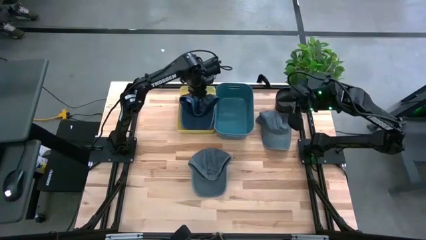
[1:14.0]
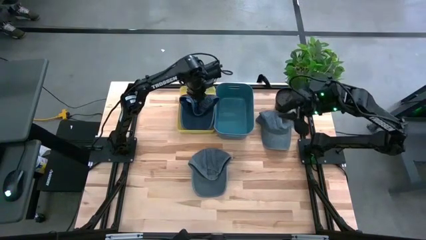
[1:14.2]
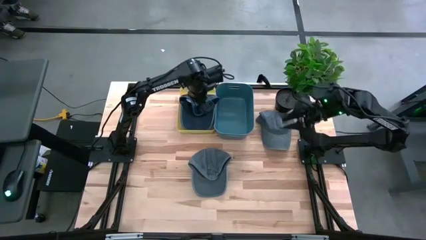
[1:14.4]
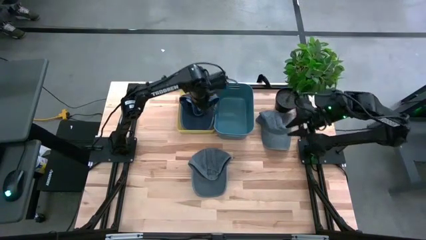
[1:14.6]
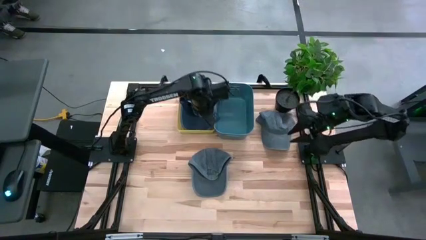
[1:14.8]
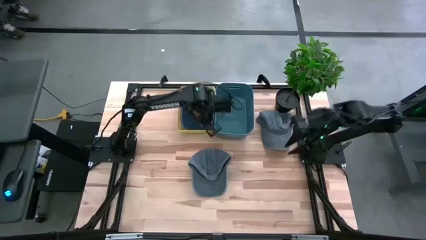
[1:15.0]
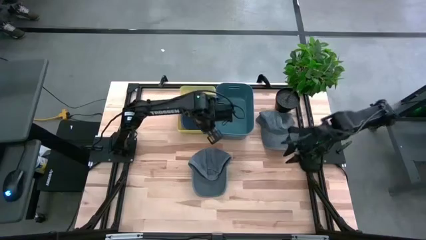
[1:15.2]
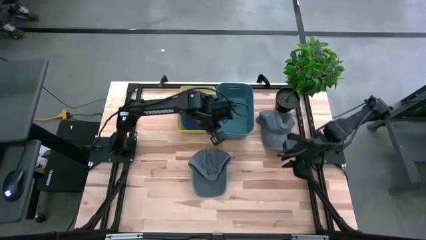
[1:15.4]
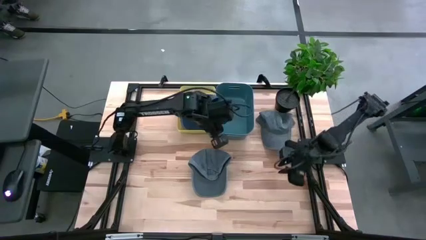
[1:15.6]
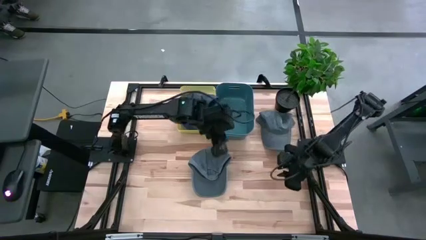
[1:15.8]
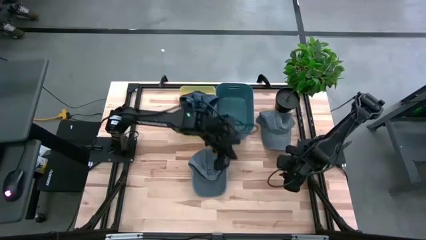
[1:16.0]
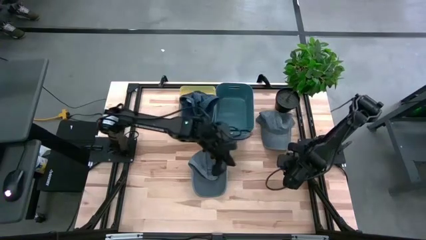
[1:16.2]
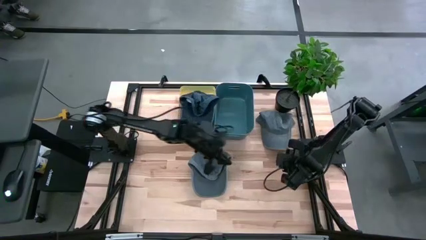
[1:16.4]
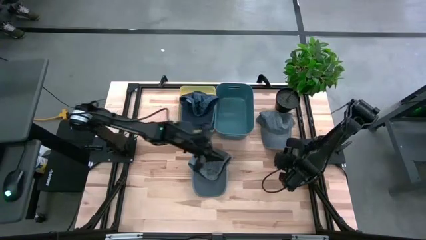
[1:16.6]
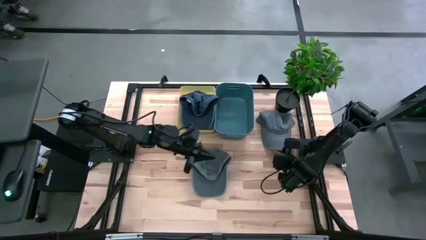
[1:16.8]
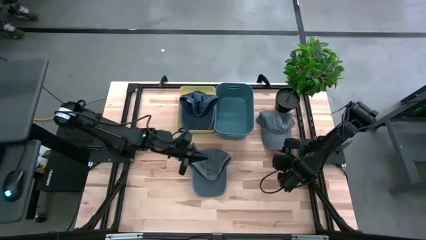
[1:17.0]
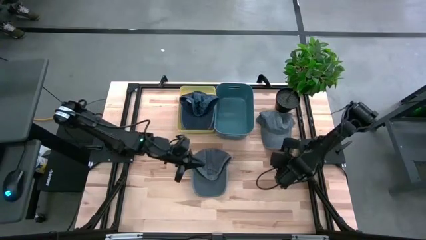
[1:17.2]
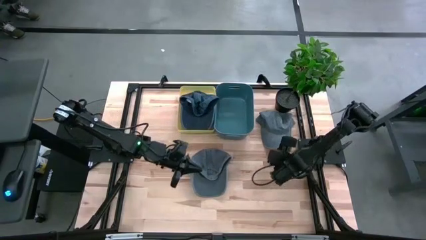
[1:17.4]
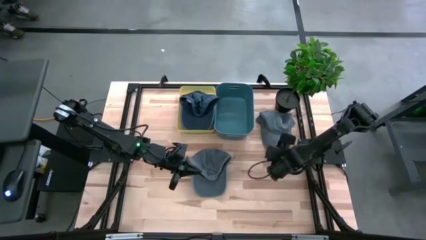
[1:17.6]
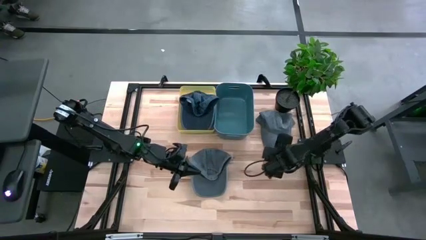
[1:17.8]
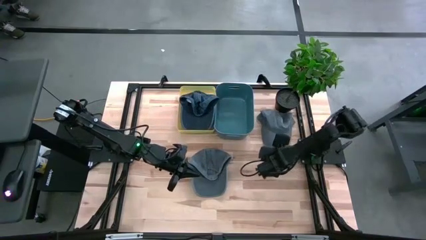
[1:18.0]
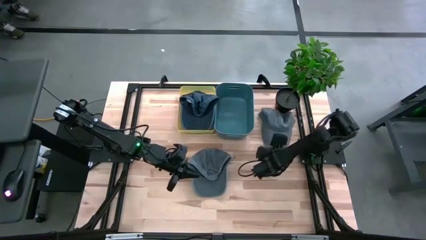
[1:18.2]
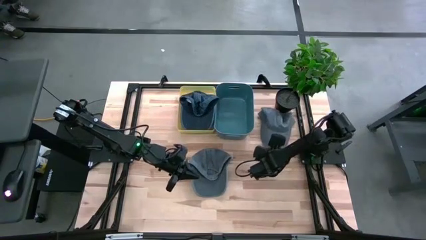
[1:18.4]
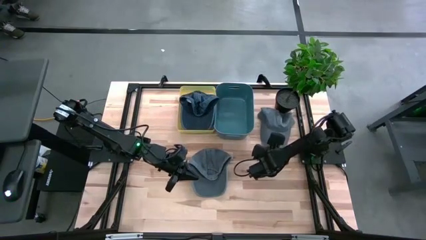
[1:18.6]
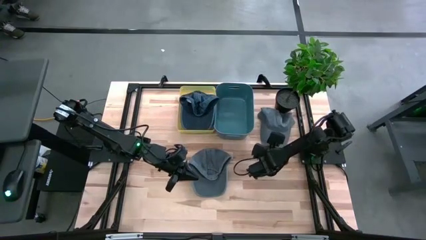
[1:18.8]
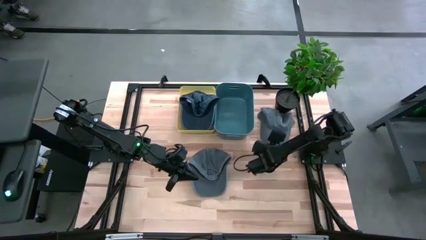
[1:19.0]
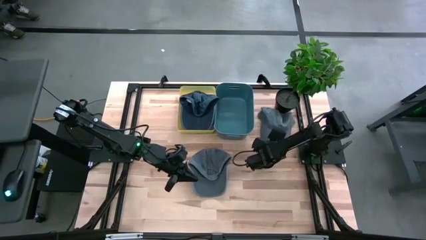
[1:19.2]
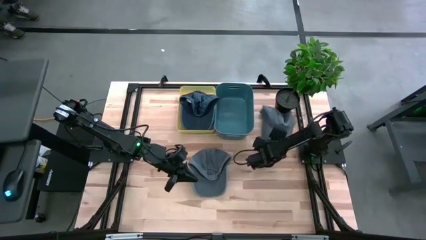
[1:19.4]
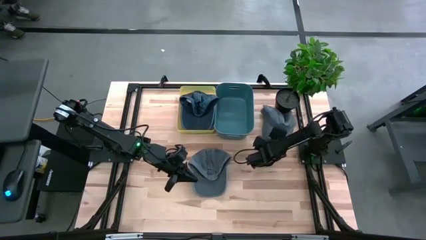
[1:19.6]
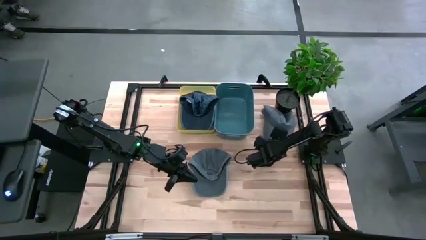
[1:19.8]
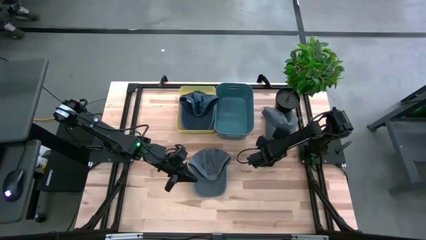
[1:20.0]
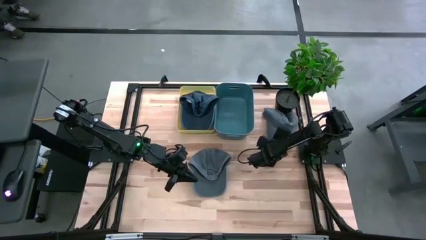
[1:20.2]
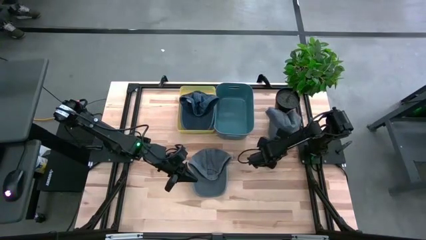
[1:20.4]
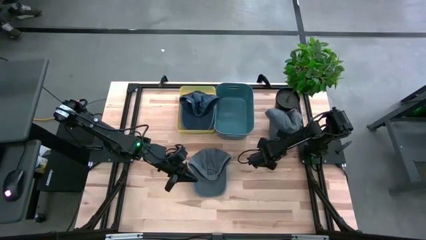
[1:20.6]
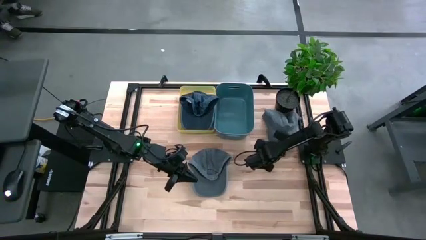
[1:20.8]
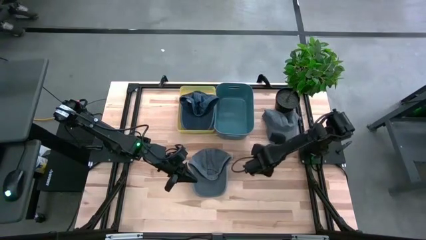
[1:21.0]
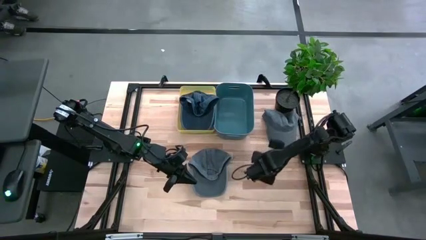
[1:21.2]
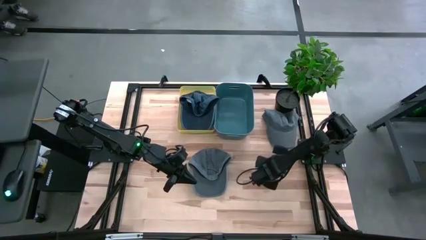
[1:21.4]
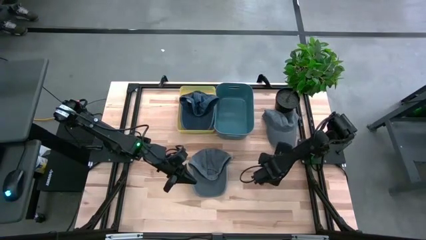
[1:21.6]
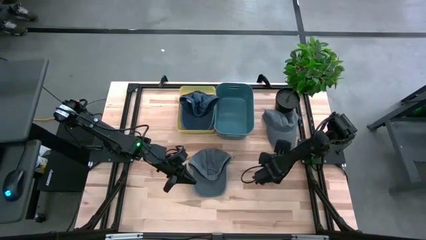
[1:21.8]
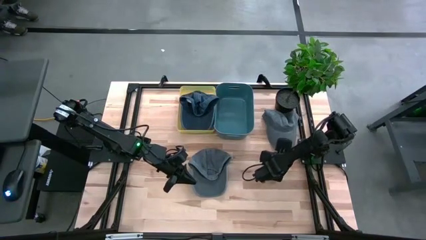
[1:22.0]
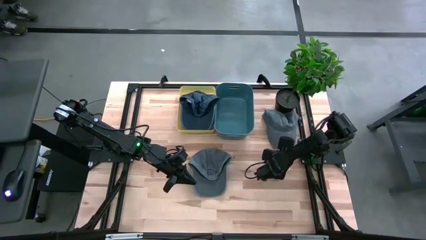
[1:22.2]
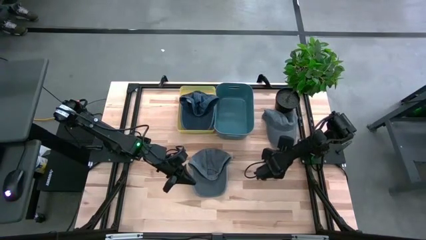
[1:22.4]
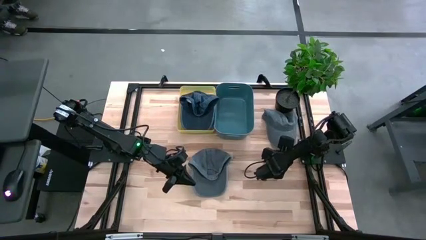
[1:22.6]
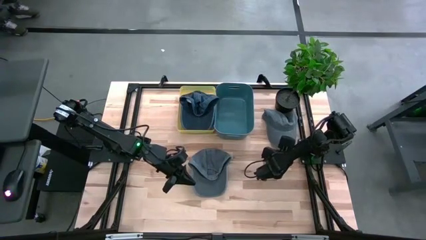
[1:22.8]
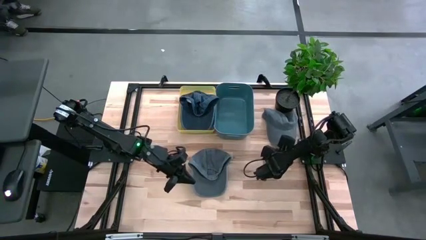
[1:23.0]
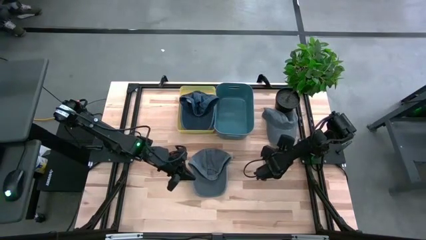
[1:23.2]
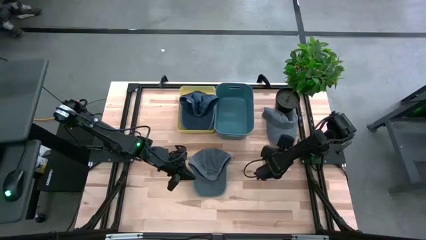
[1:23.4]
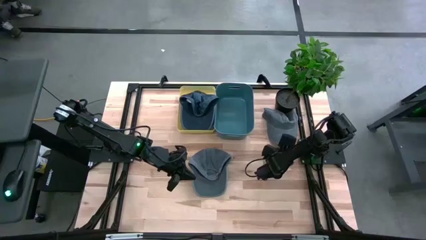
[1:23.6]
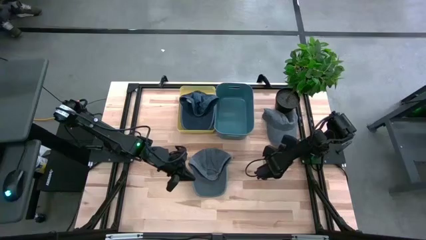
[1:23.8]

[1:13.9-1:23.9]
Task: Pick & Place hat
Put the right grey cap into the grey bin
